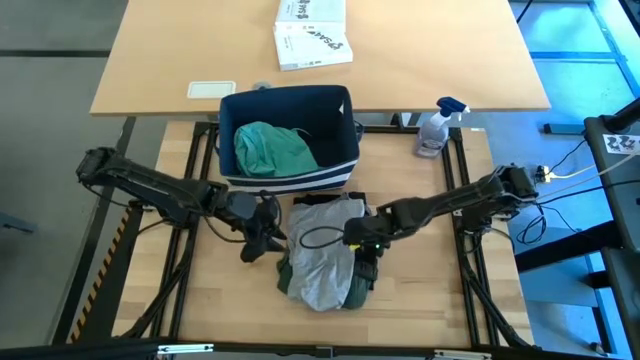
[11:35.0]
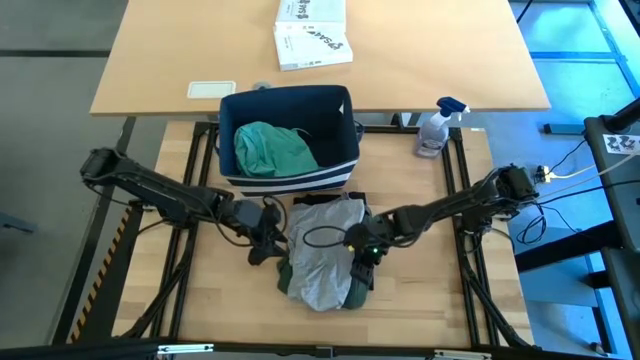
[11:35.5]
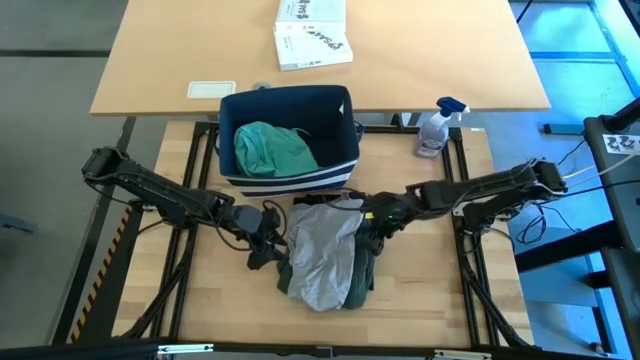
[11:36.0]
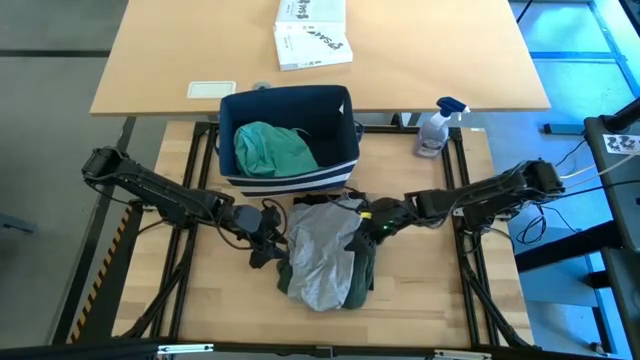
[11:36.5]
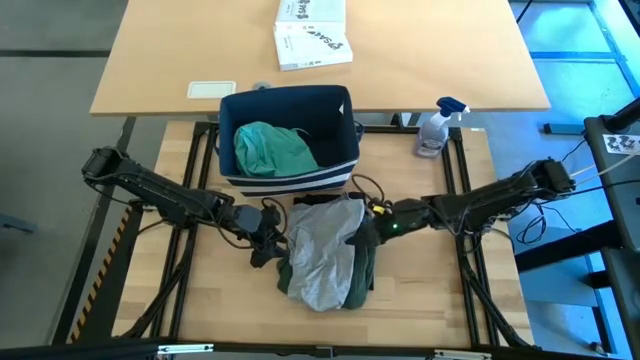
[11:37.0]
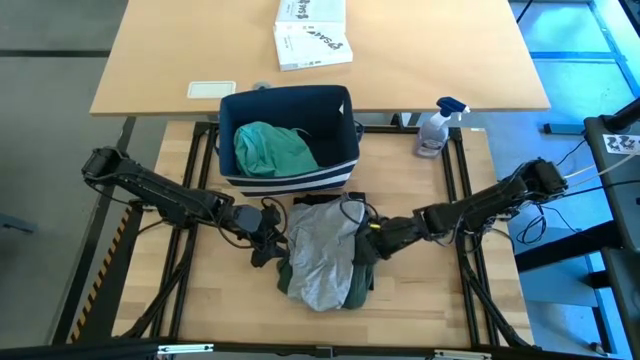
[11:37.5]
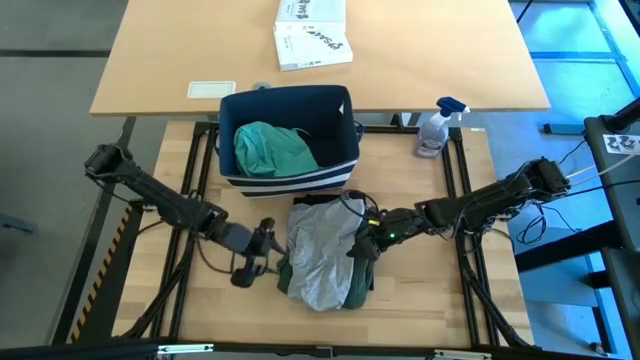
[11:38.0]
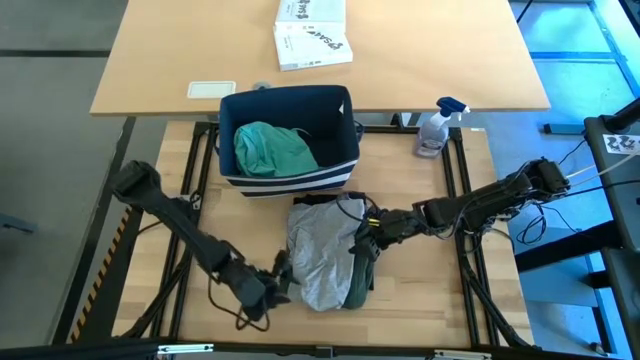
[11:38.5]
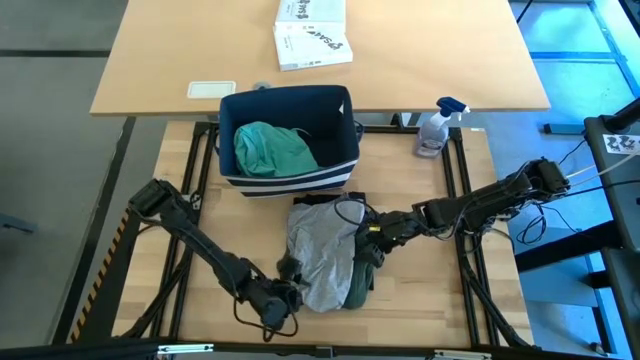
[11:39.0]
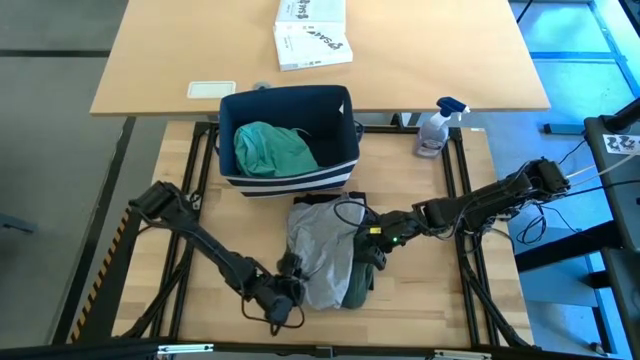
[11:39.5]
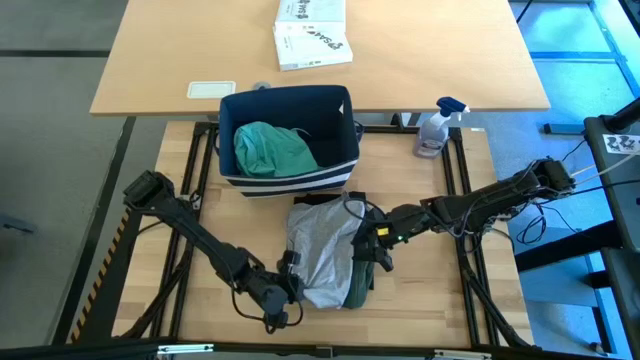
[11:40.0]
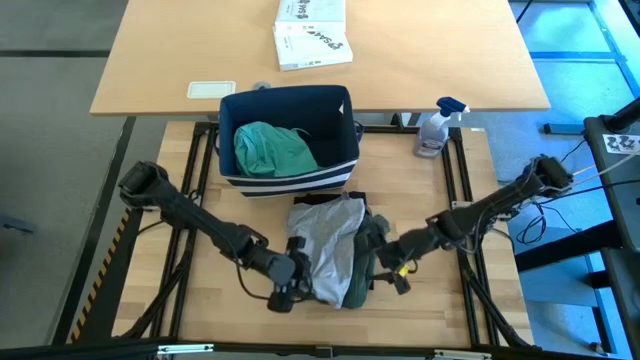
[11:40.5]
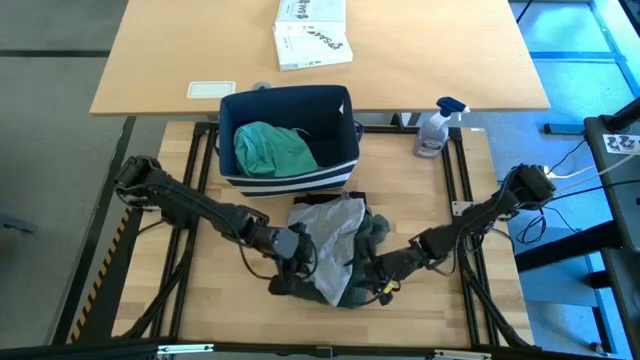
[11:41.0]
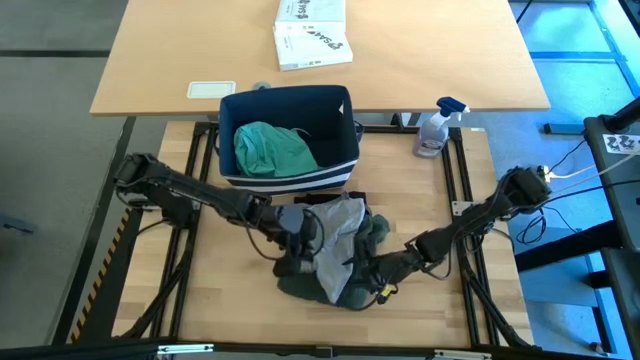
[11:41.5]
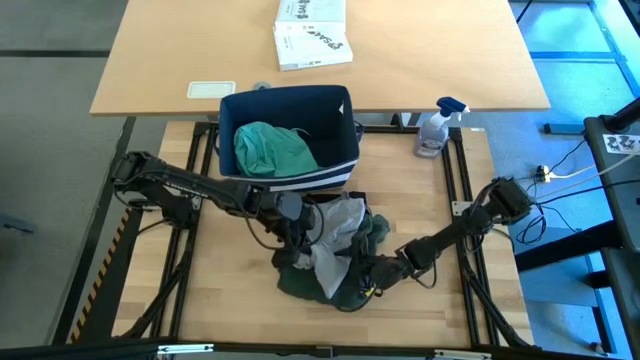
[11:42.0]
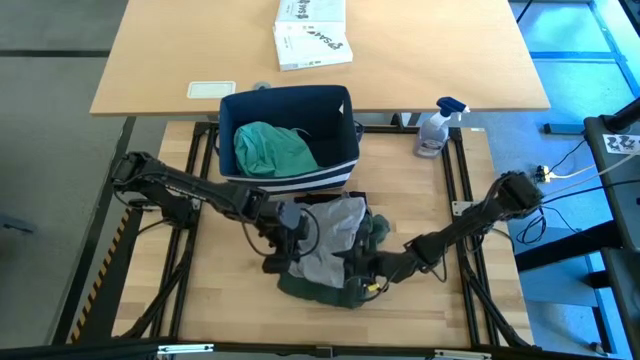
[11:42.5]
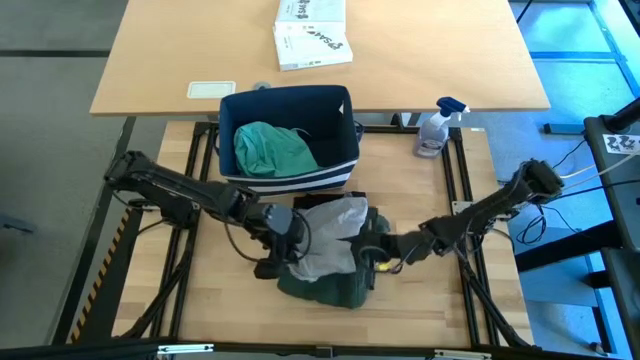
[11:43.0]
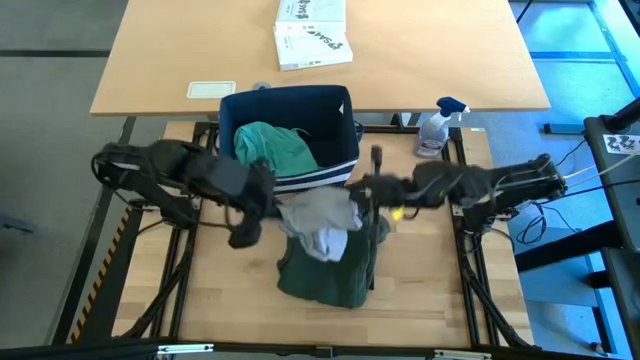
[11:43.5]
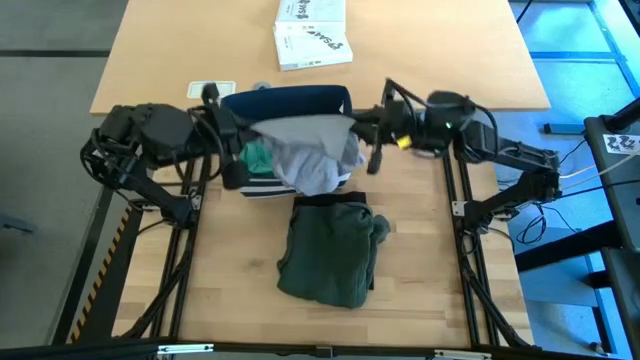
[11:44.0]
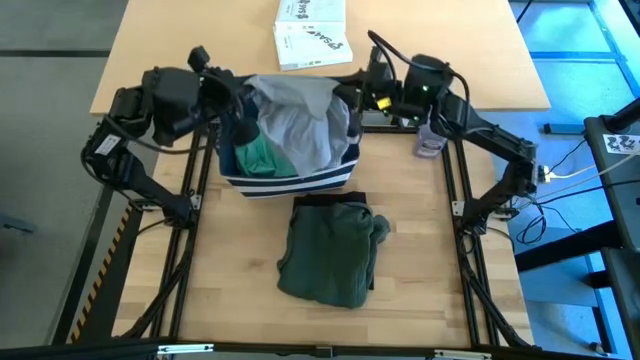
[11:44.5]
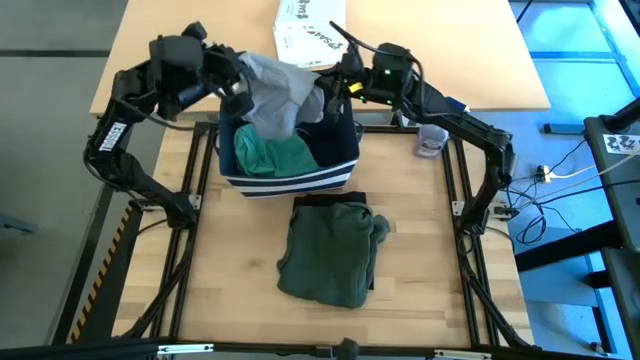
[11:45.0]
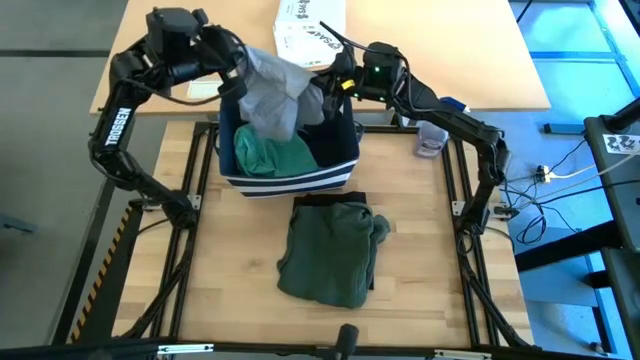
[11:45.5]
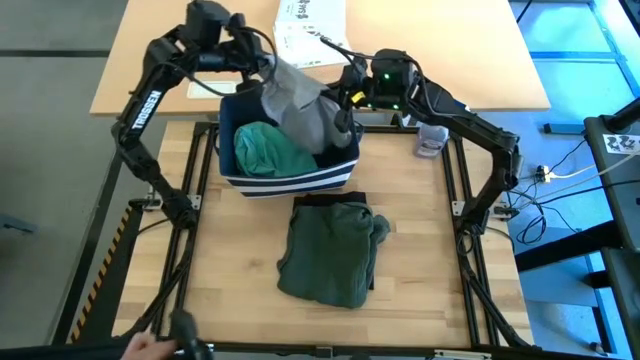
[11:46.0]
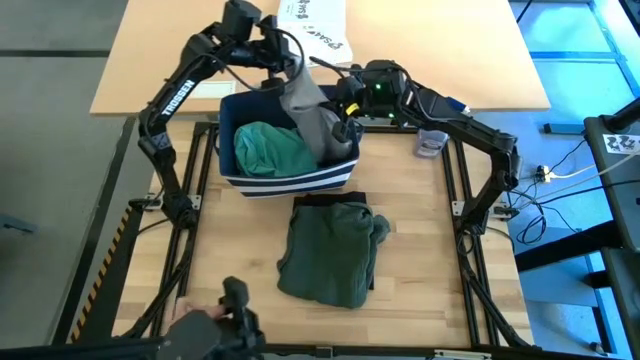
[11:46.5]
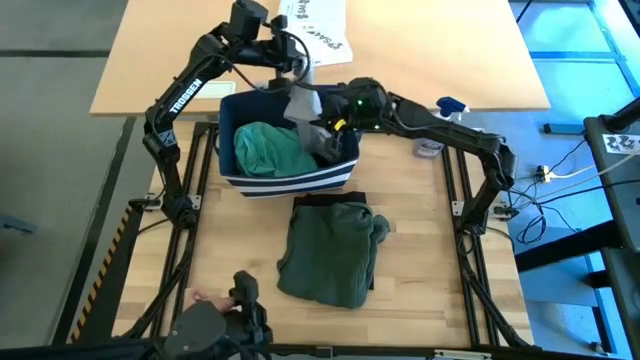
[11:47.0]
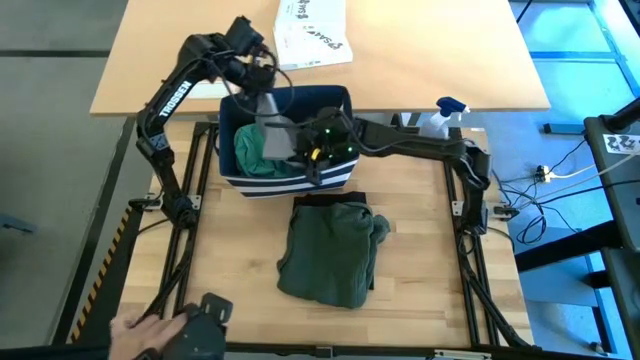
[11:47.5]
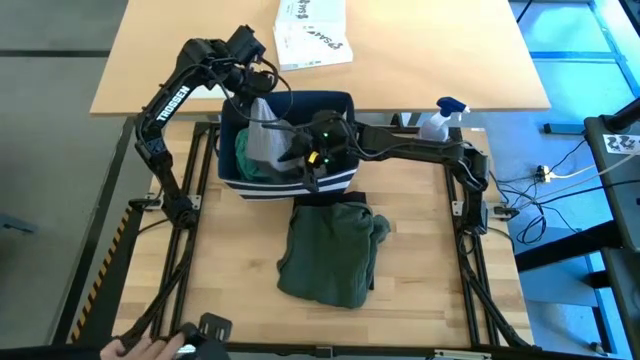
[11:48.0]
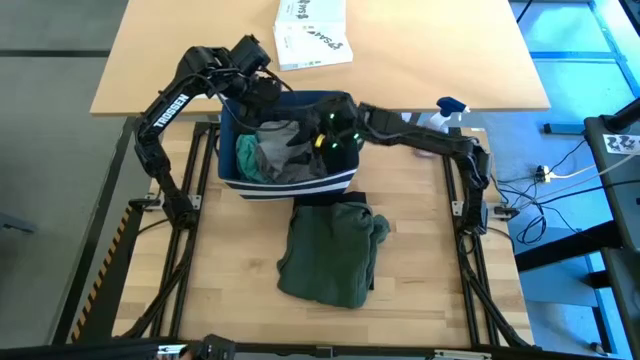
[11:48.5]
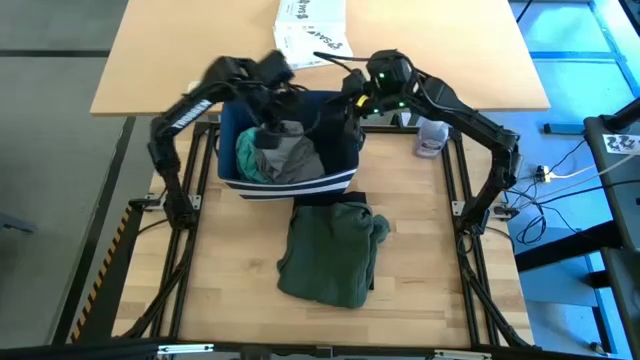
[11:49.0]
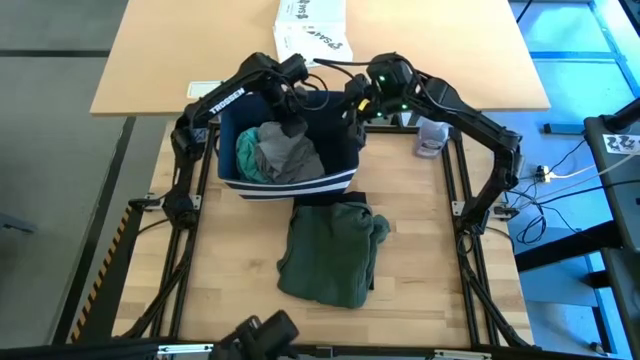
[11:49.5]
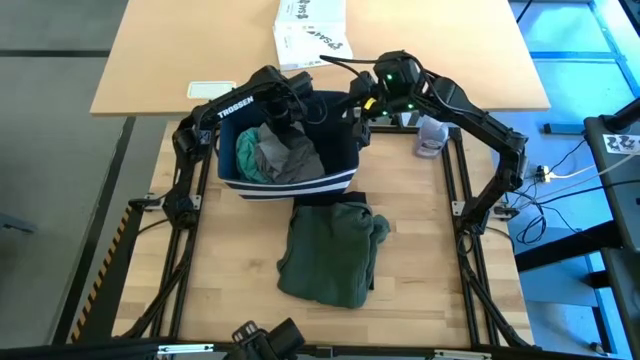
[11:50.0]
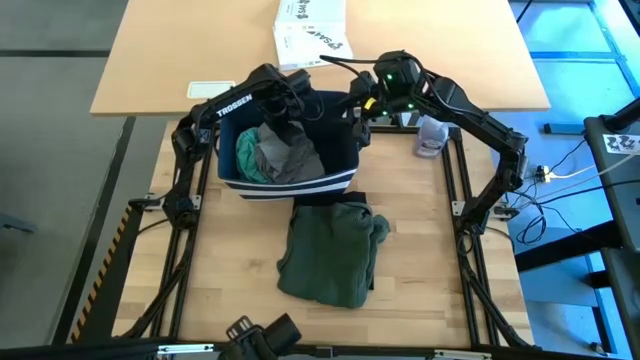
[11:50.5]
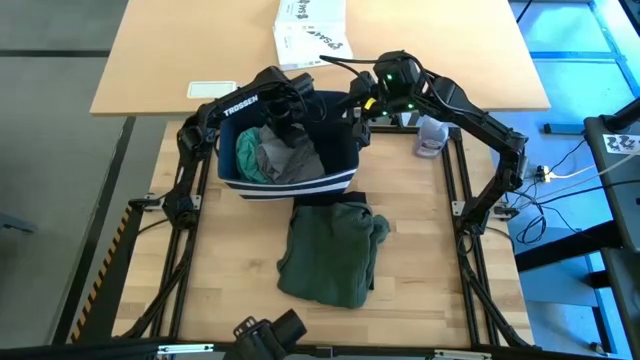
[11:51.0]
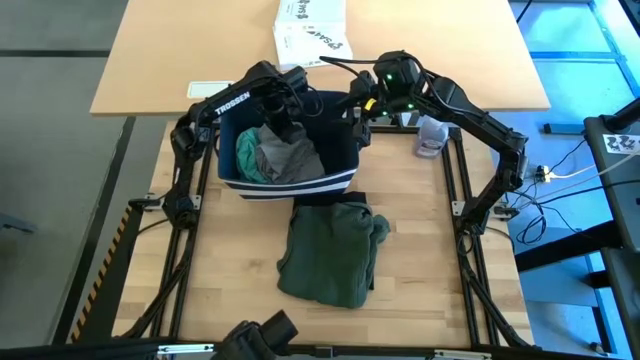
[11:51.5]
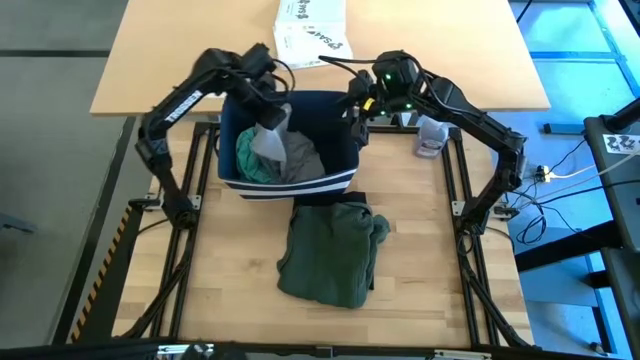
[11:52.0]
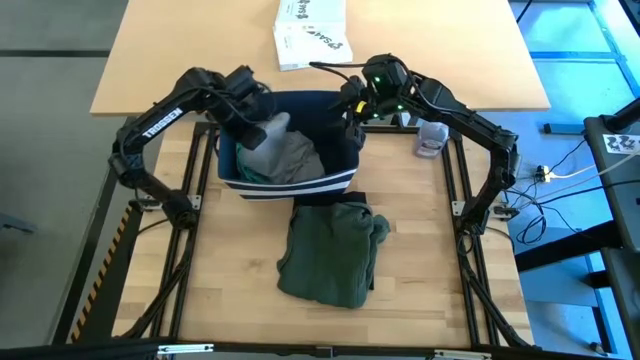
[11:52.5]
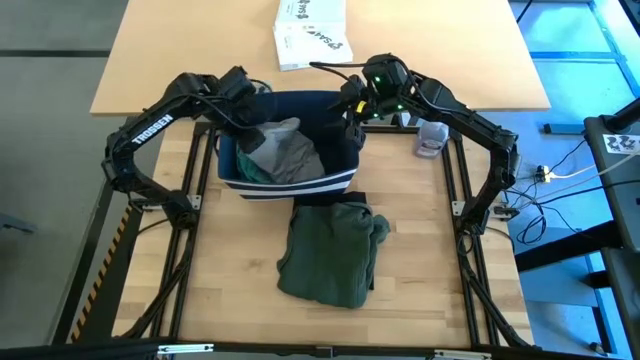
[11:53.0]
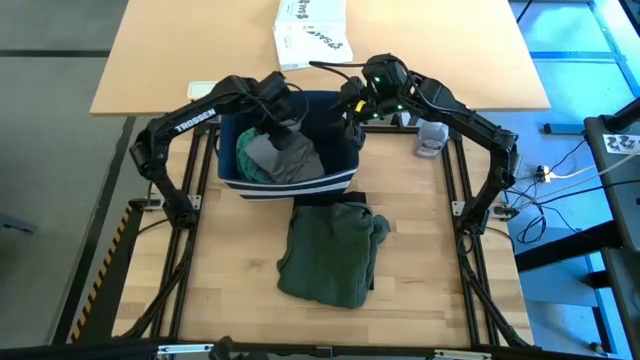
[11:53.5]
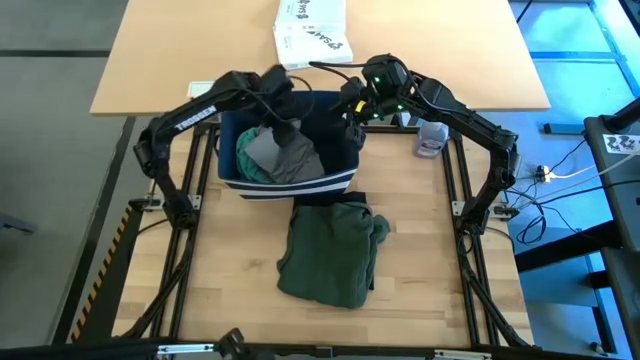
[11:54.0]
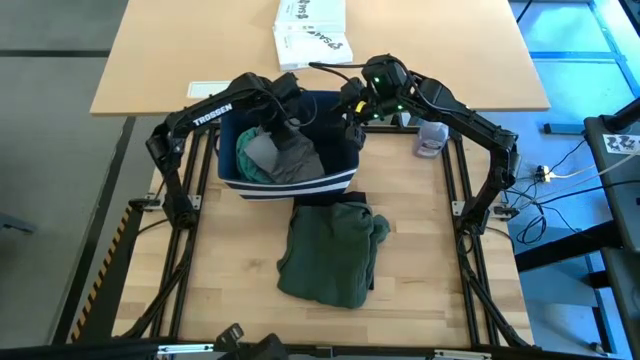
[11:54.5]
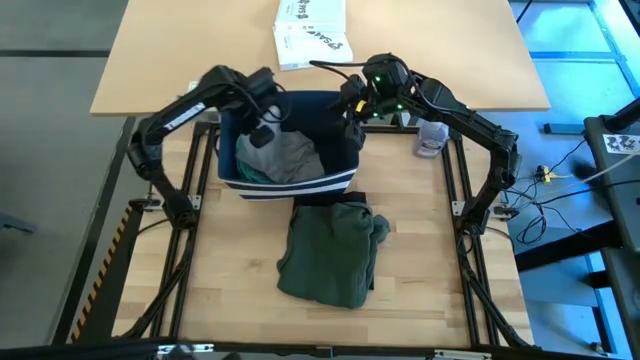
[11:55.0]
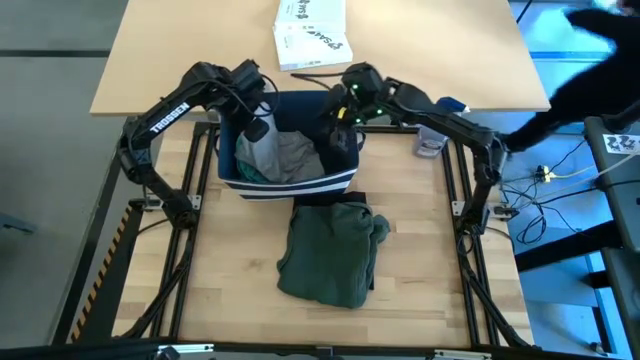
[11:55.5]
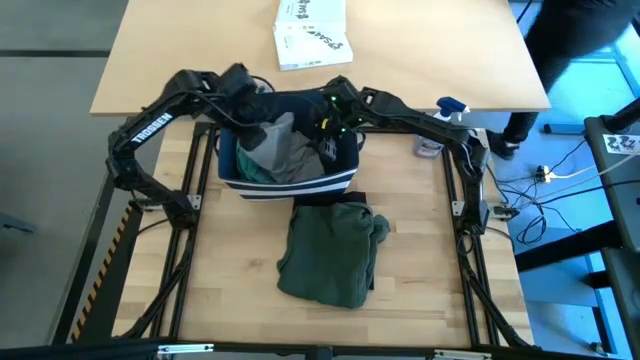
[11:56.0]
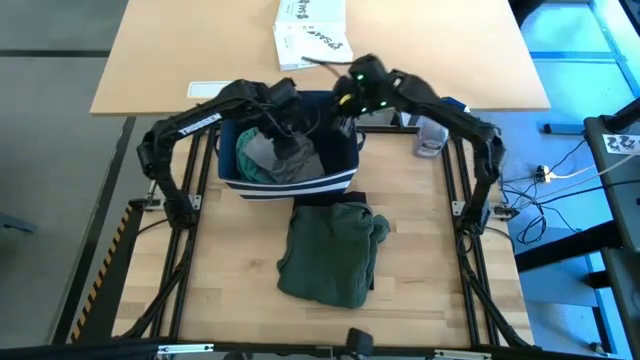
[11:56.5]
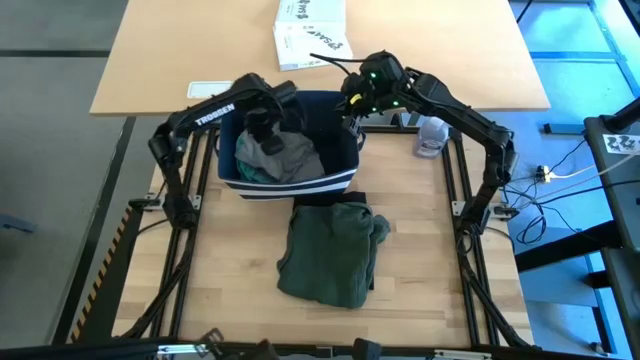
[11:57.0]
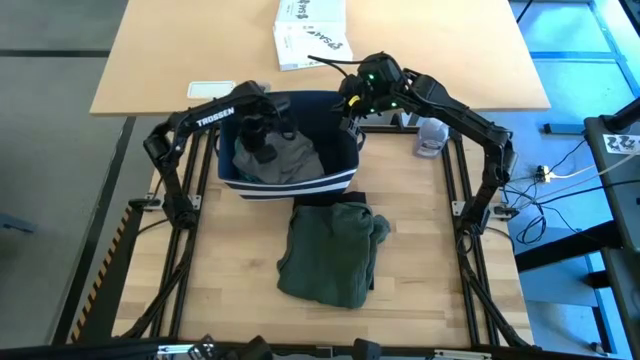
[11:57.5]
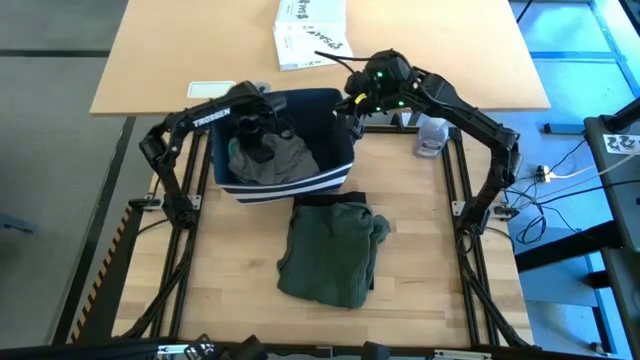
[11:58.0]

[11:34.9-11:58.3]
Task: Fold Laundry from Bin
Put the folded gray shirt into the blue bin
